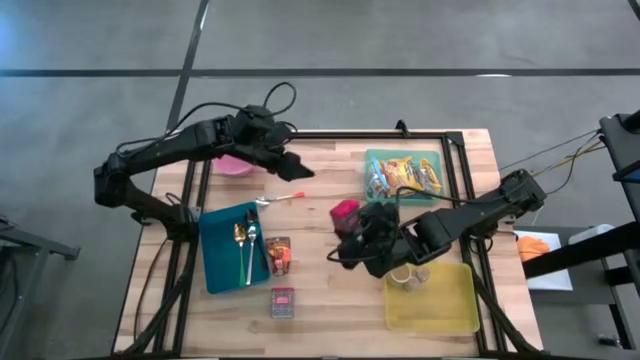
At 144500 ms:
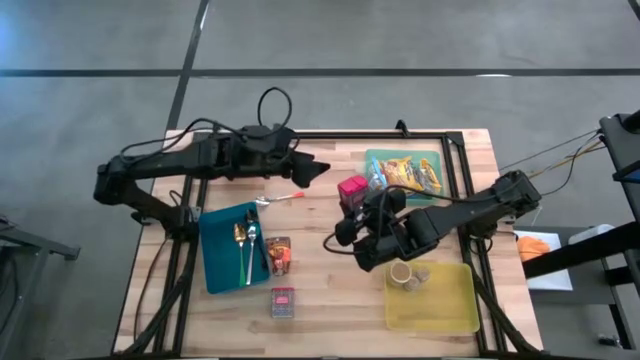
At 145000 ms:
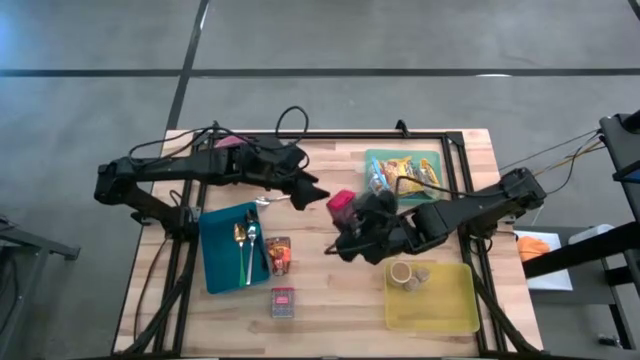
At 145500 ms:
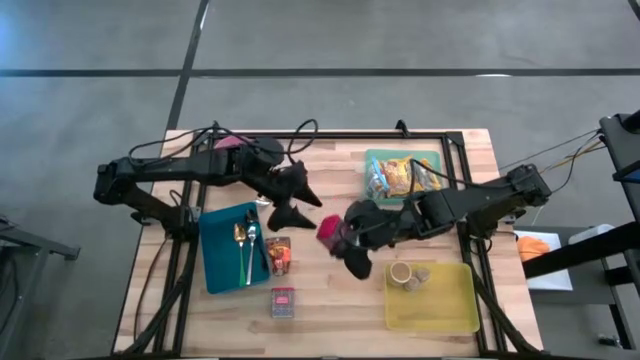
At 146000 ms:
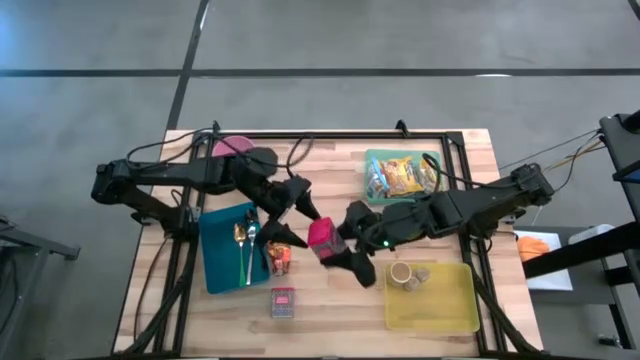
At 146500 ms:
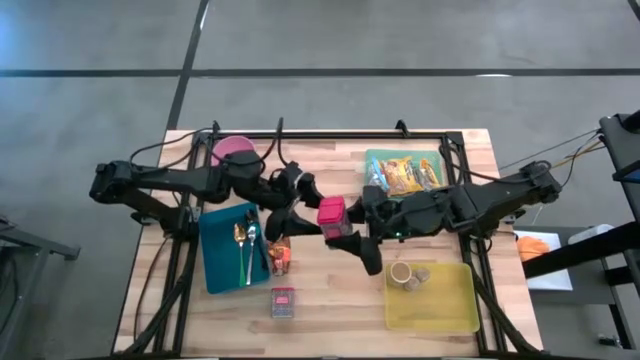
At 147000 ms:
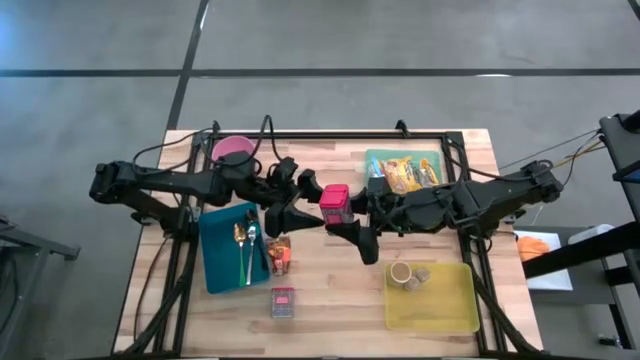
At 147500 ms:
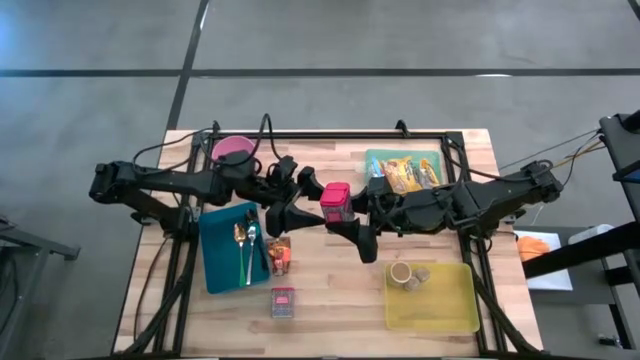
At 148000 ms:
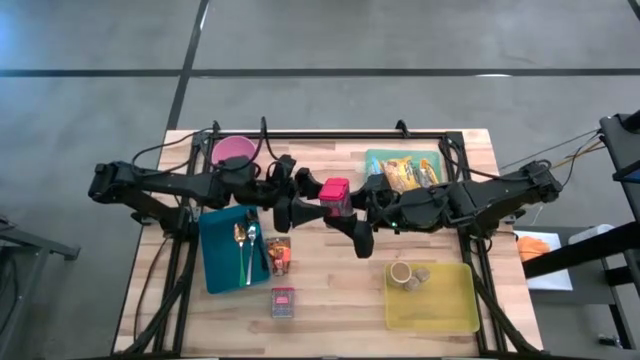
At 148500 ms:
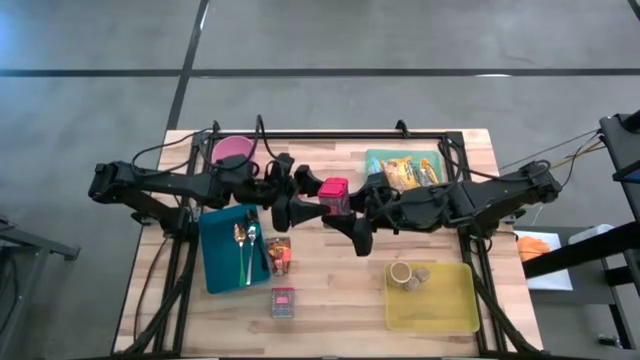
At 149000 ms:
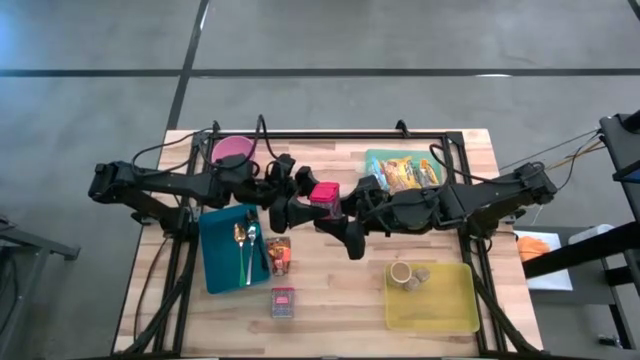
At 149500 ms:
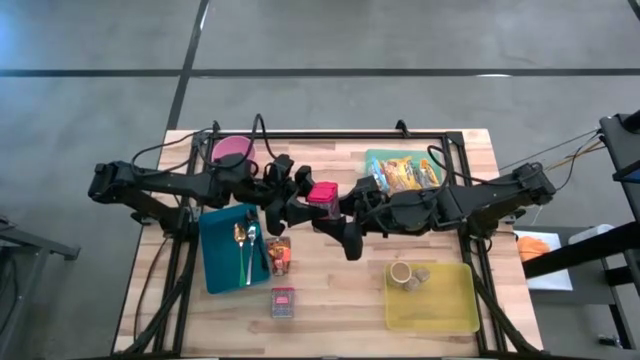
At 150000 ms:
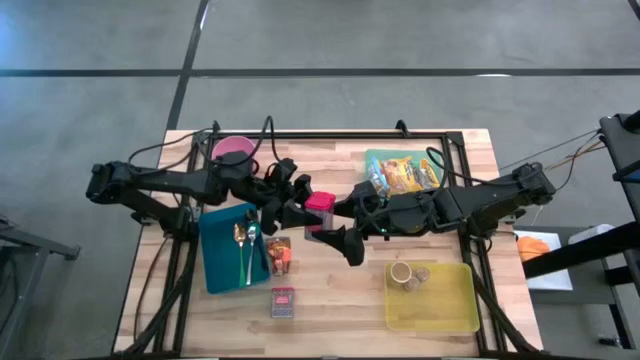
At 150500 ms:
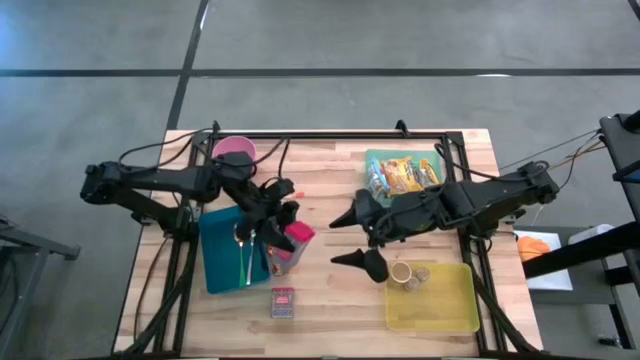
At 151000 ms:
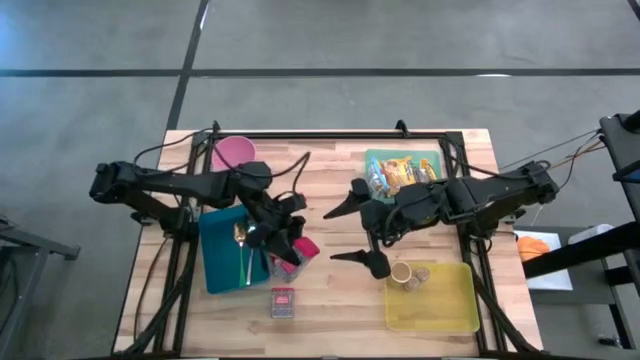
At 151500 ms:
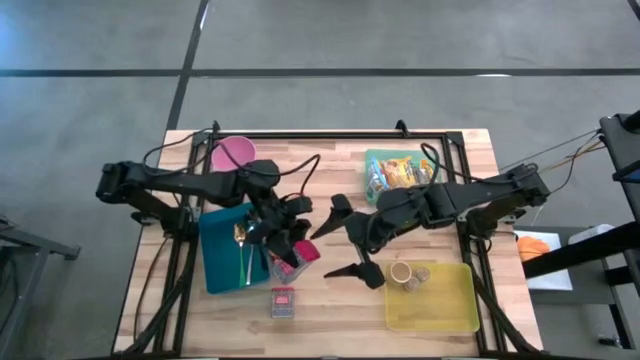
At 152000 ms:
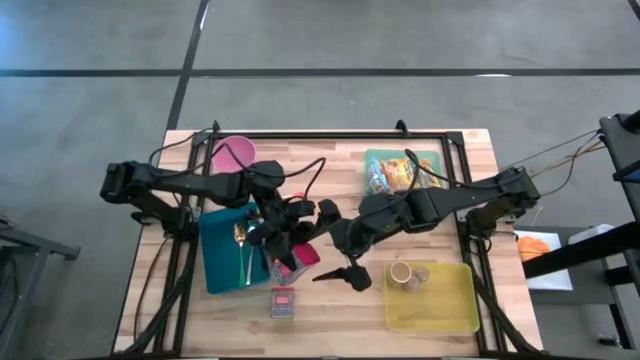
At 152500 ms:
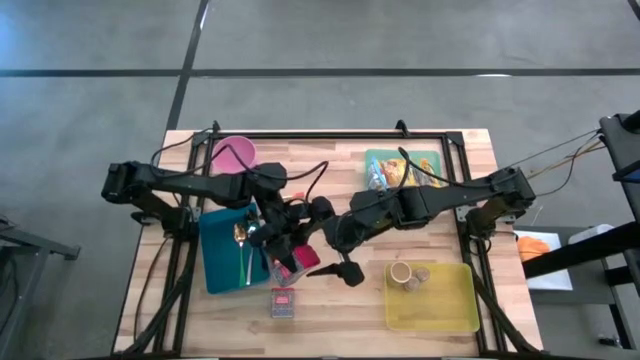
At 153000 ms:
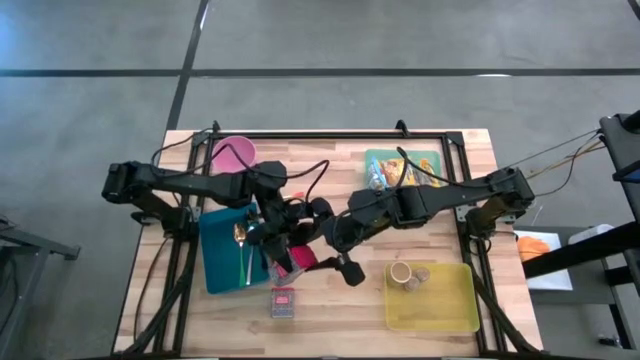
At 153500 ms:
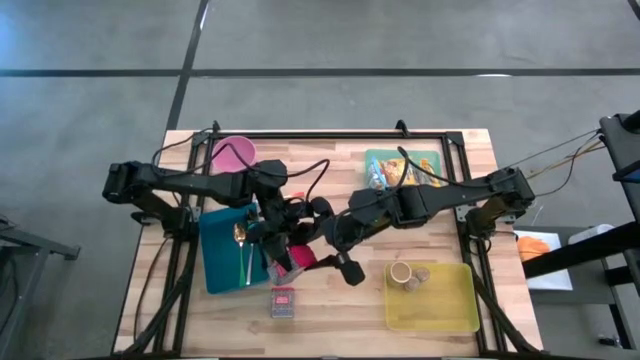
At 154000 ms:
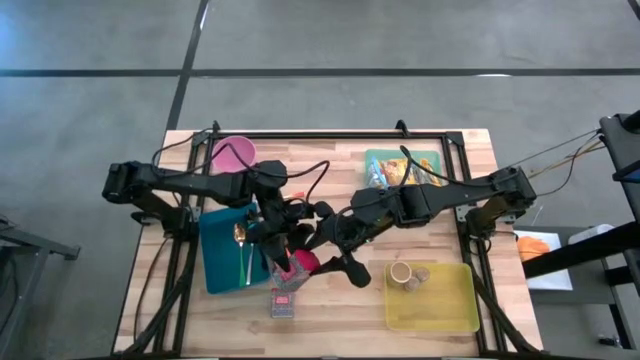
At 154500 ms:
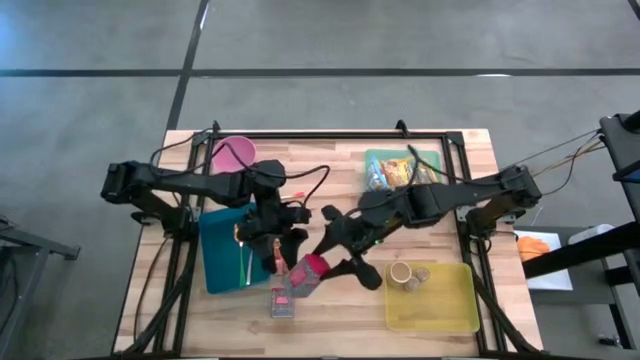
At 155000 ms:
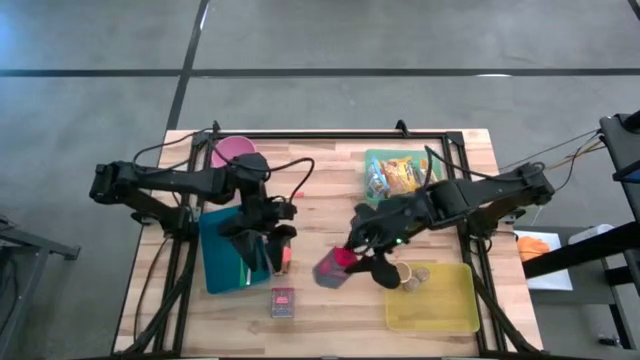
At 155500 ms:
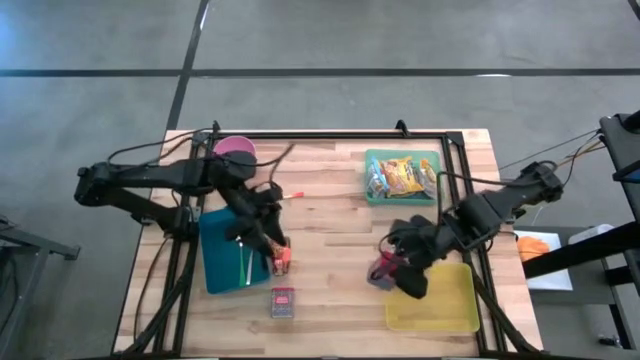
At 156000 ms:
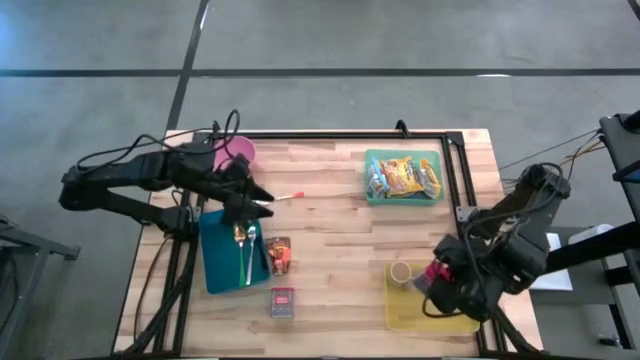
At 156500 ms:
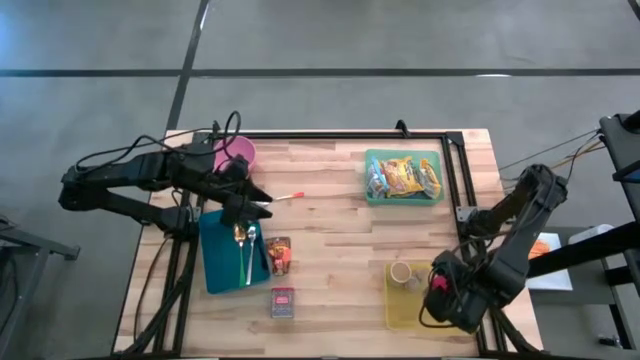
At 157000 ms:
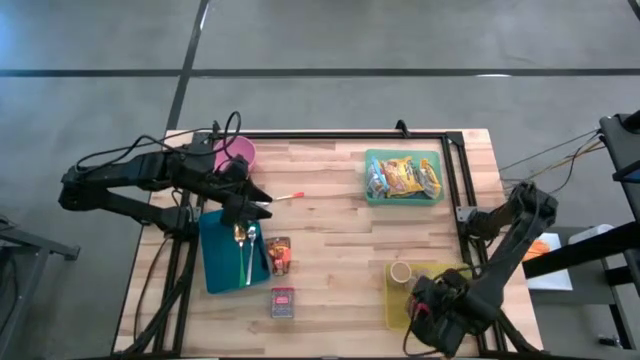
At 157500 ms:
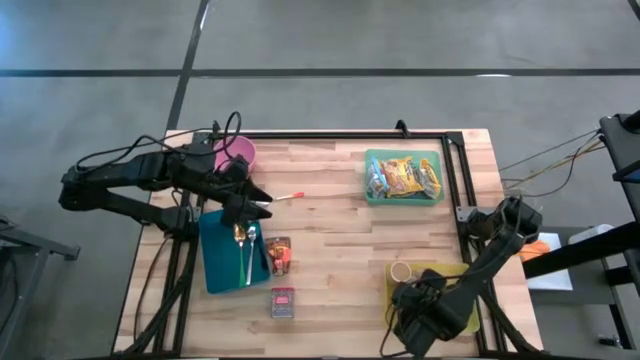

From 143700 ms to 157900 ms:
Put the right red spice can into the yellow bin

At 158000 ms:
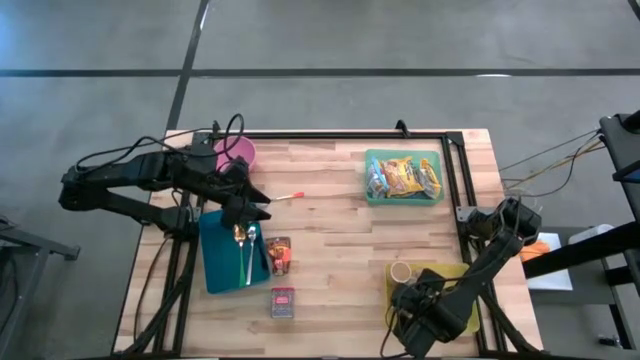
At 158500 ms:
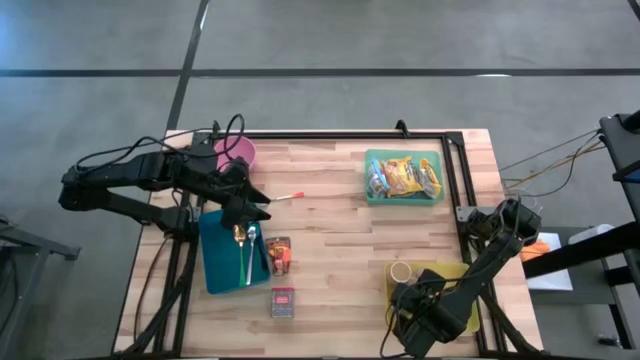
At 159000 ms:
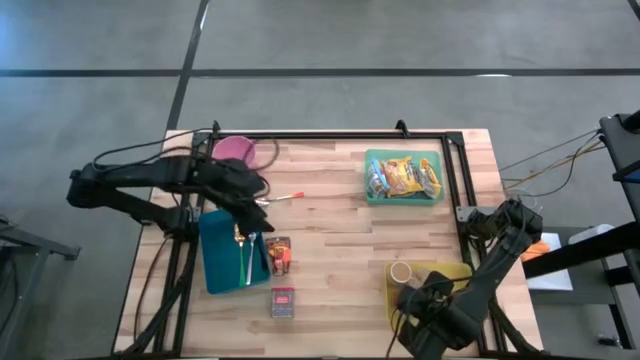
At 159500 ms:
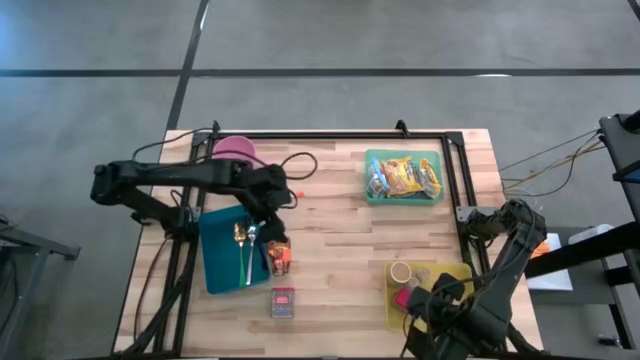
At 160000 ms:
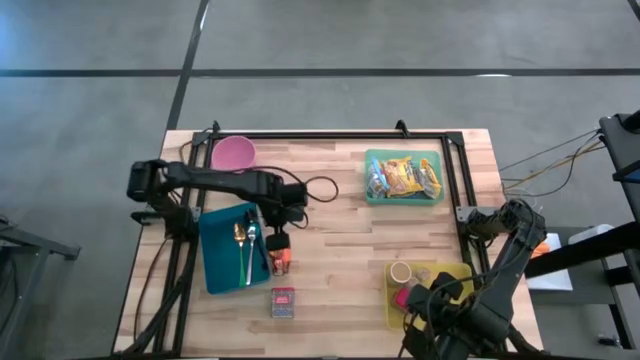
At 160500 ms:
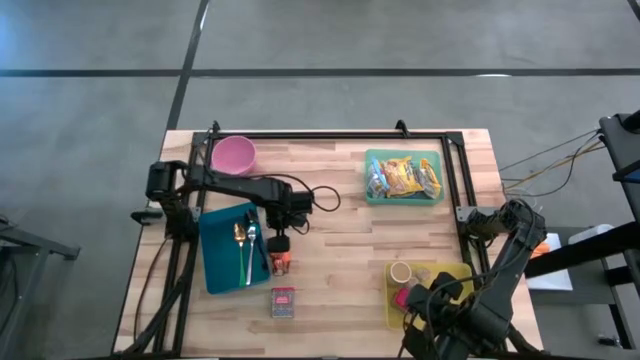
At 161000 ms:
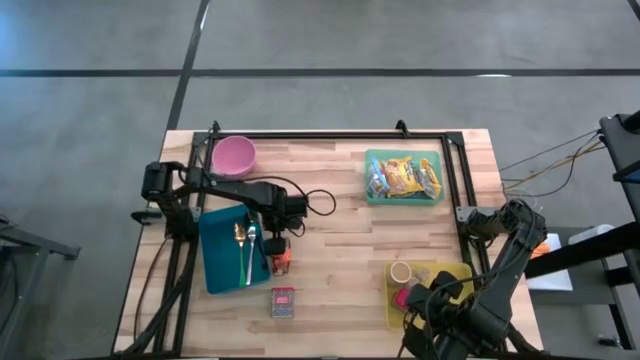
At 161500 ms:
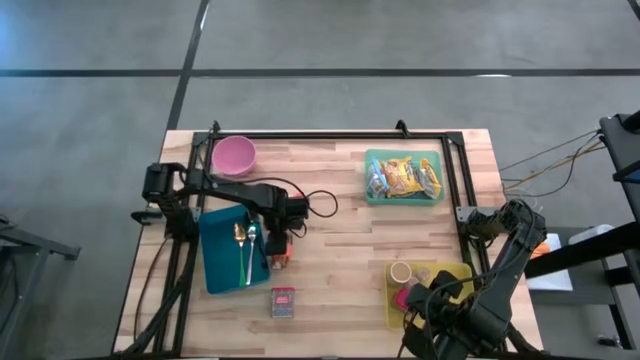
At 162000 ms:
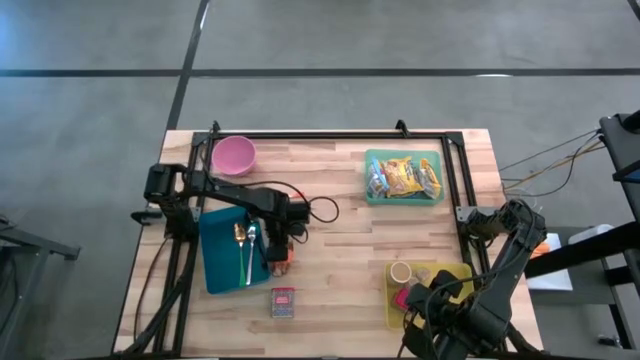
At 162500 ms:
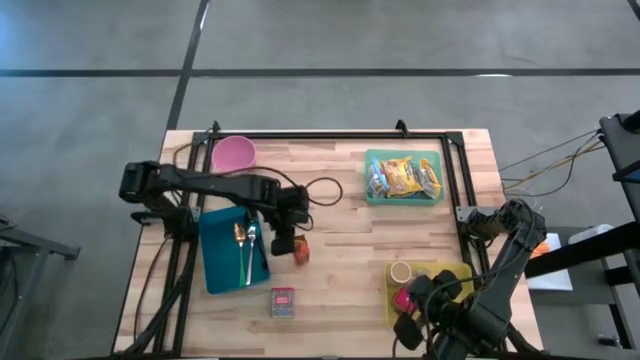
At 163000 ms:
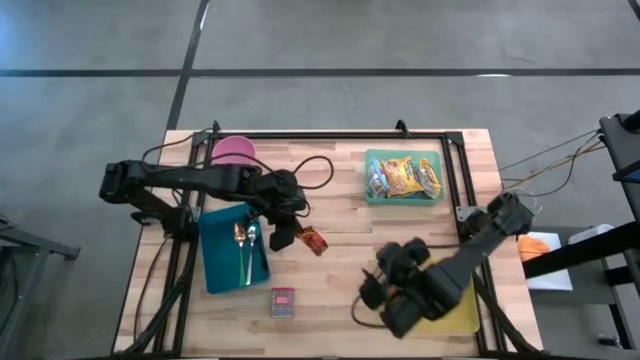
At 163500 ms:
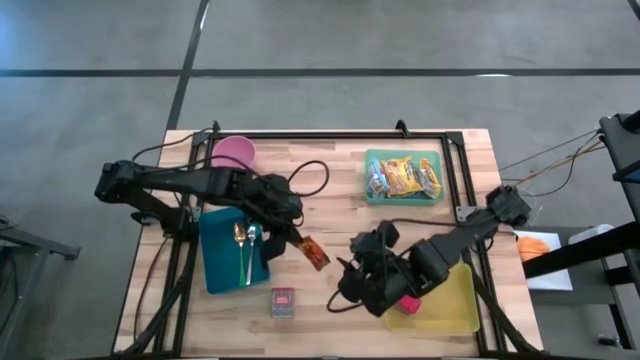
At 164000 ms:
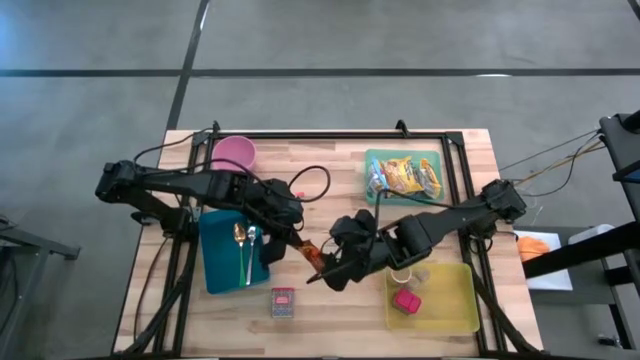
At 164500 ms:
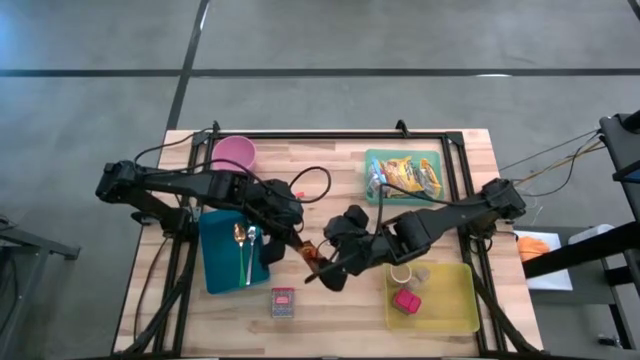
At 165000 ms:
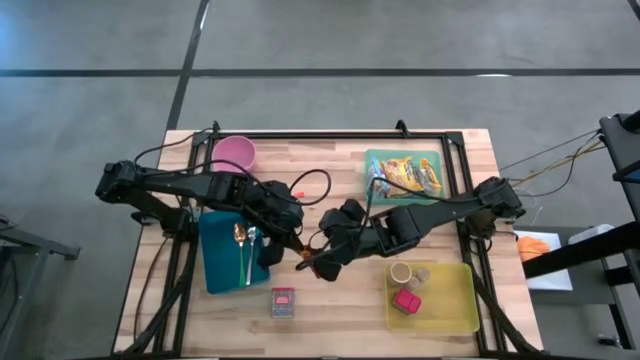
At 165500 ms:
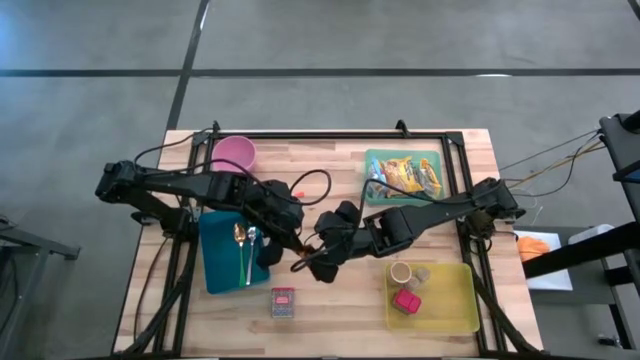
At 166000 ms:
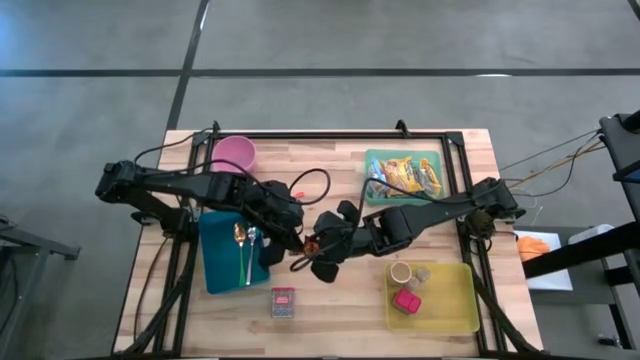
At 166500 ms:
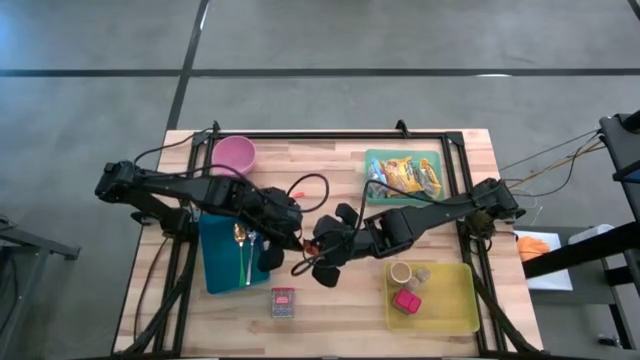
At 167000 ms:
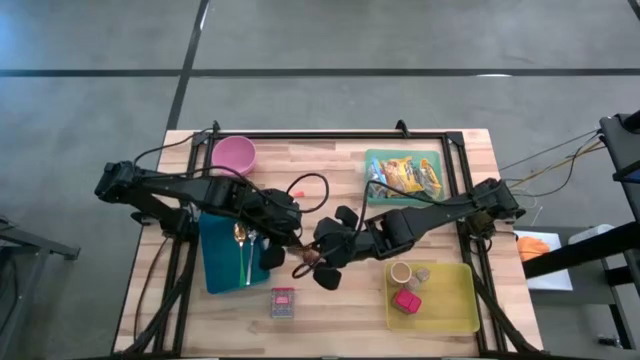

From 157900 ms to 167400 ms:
Put the orange spice pack into the yellow bin
